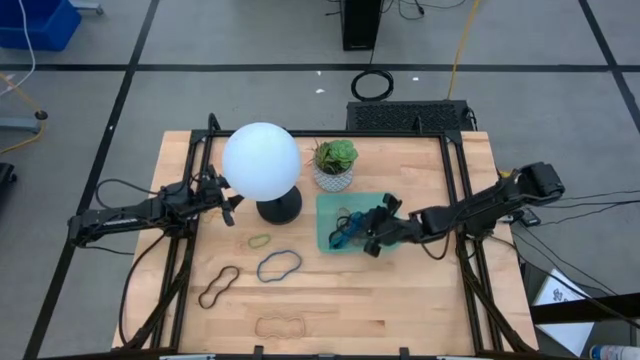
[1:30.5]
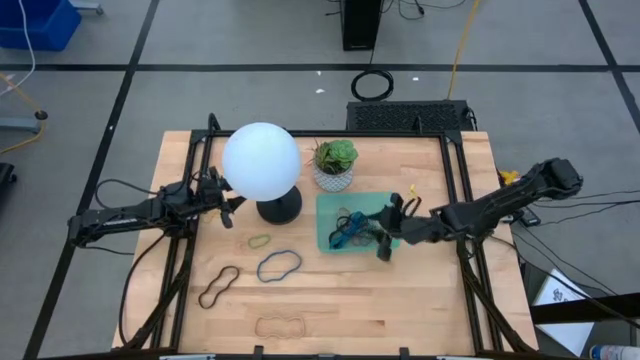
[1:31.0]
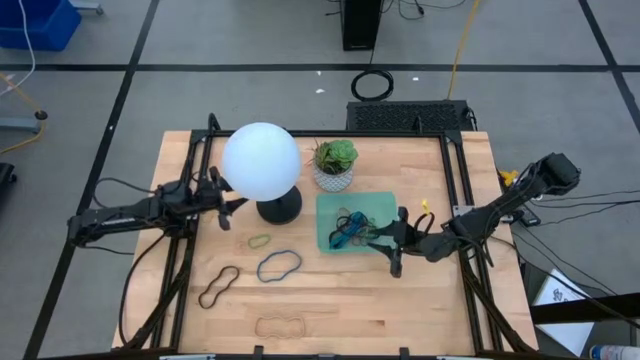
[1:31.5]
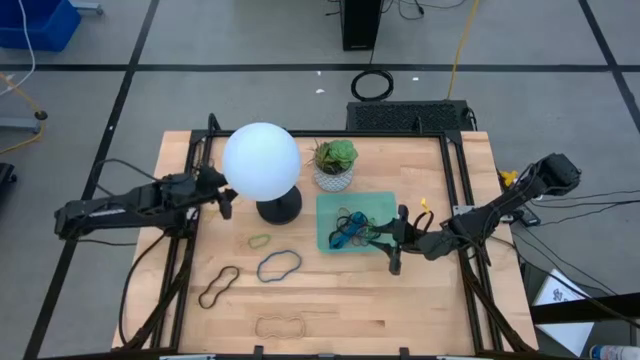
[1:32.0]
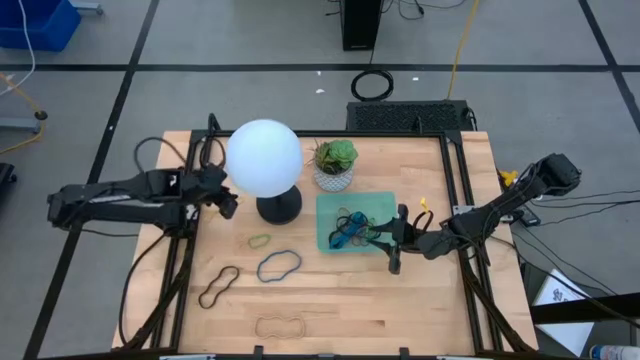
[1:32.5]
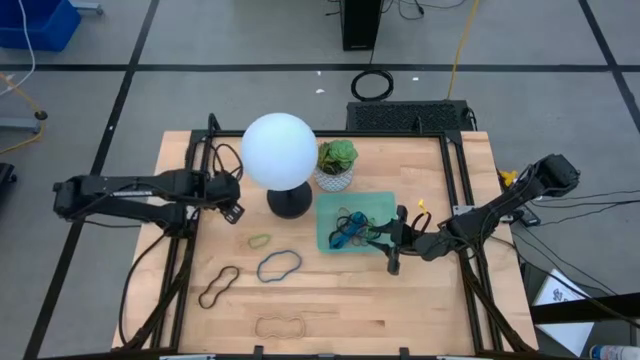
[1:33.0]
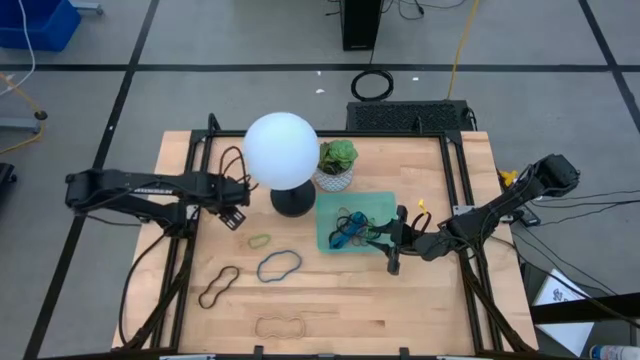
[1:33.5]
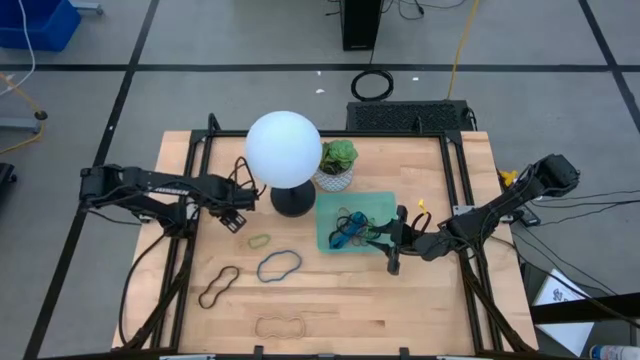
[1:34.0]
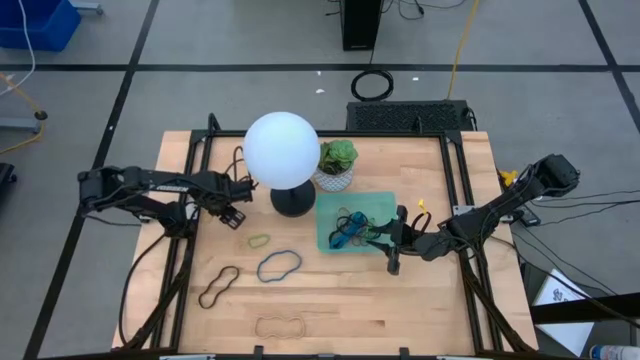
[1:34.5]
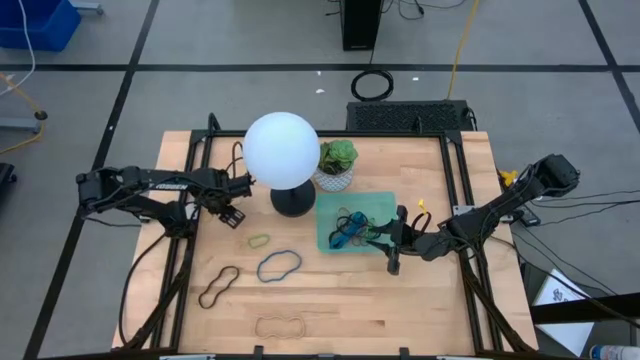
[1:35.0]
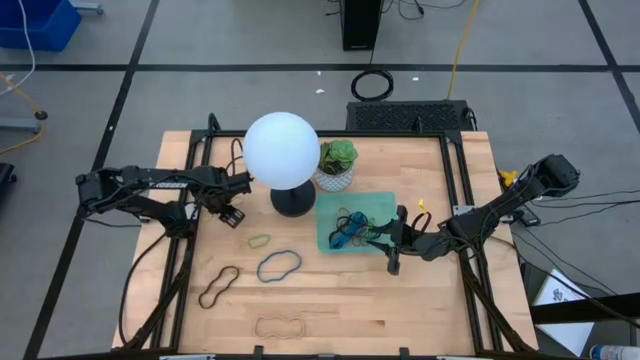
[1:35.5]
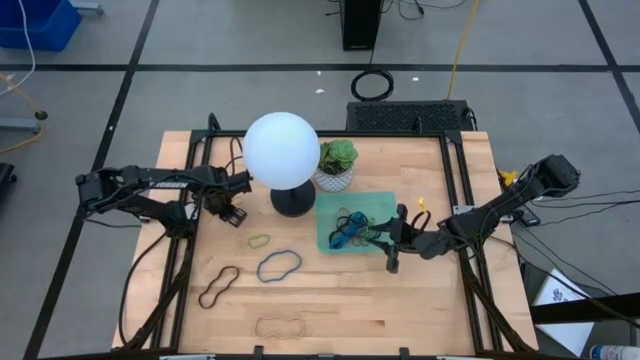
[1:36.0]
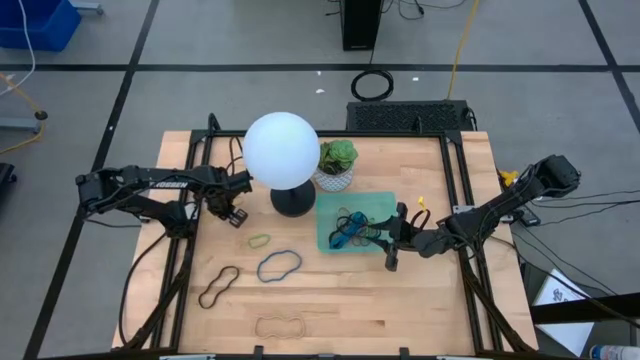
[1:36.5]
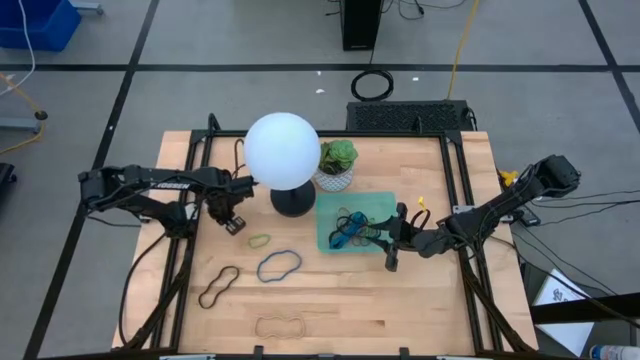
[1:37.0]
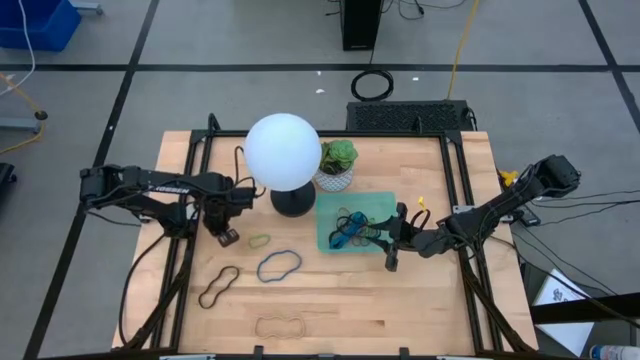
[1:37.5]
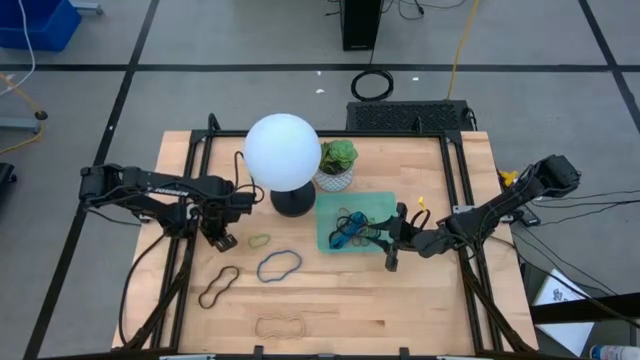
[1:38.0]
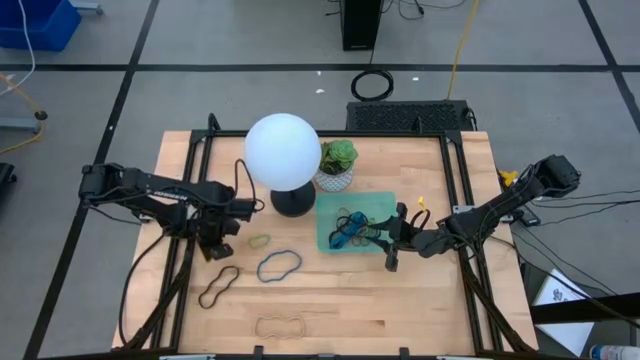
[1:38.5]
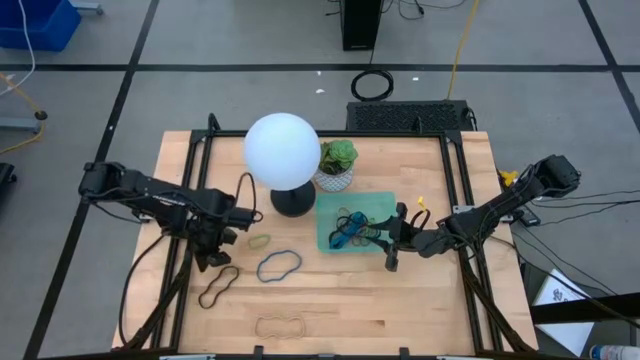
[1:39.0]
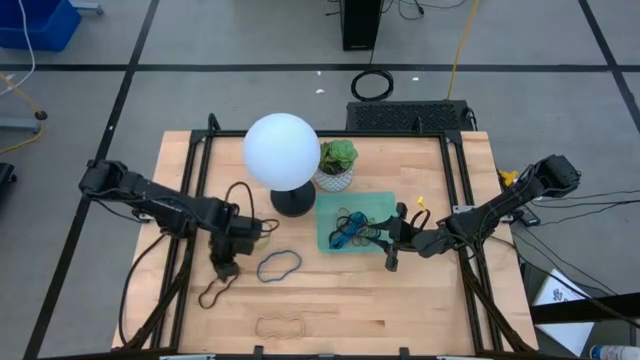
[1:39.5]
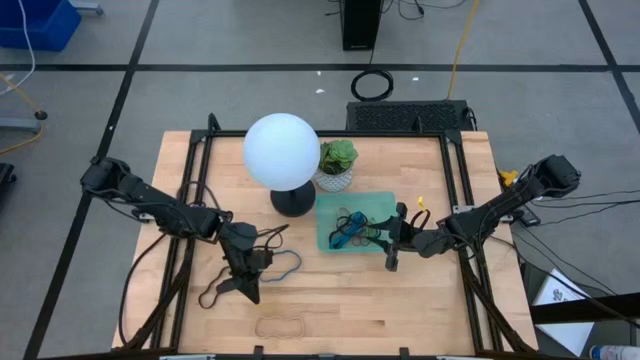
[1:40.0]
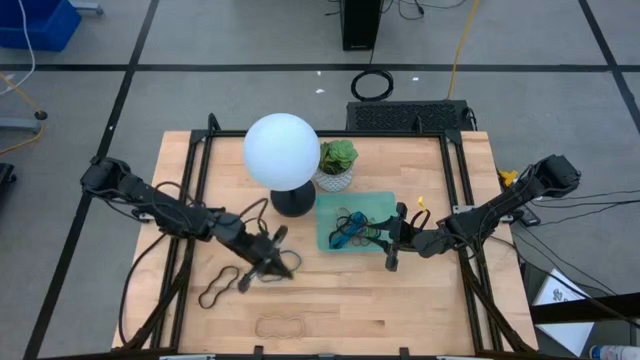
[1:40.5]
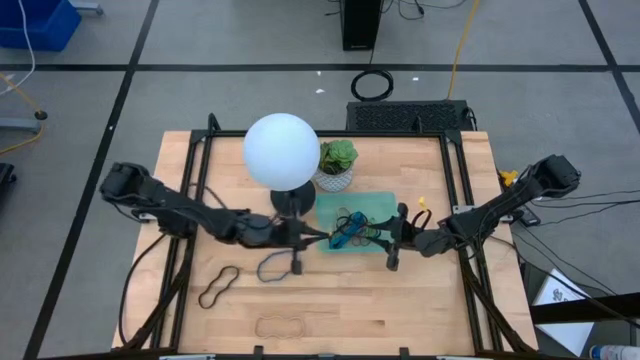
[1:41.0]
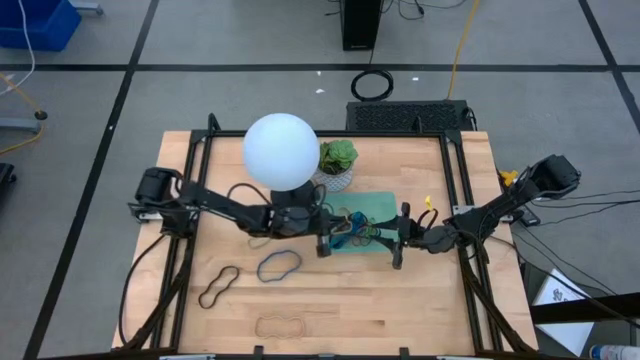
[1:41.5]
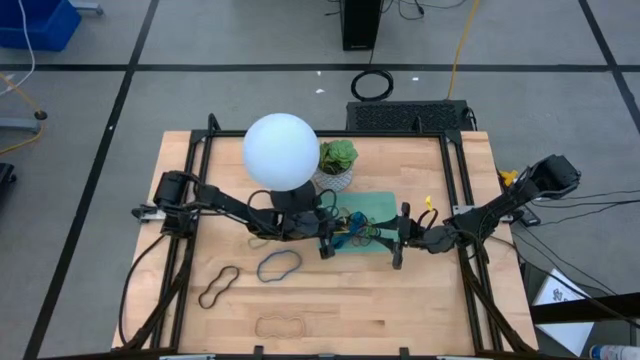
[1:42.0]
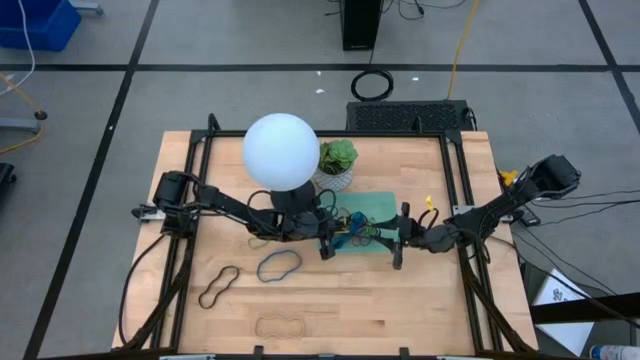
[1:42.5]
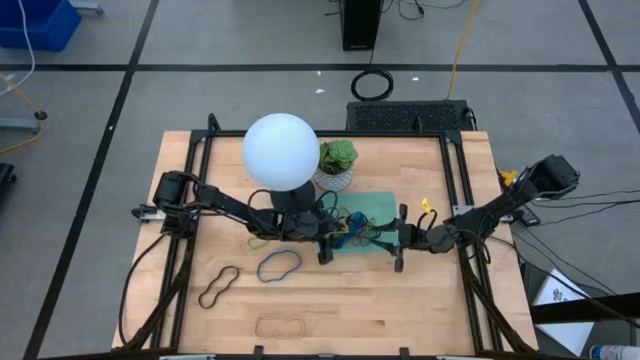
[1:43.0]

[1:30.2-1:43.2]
Task: Pick and place rubber bands into bin
Put the yellow rubber band into the blue bin

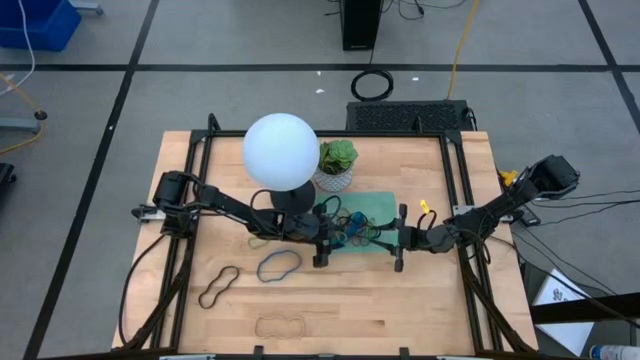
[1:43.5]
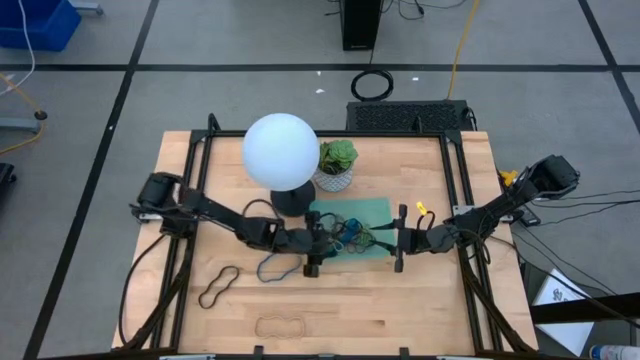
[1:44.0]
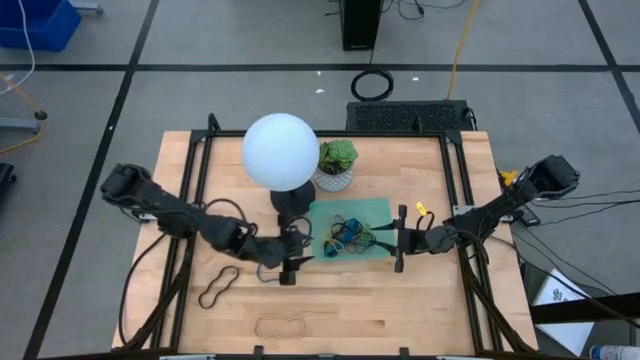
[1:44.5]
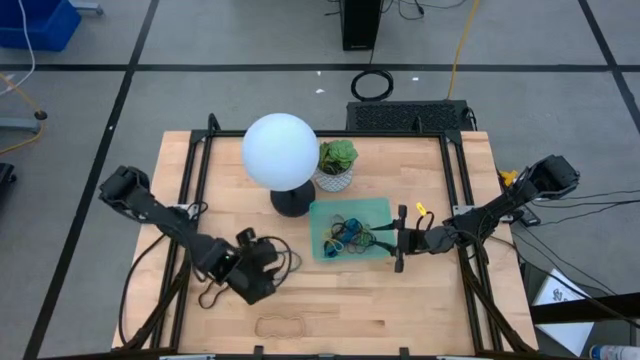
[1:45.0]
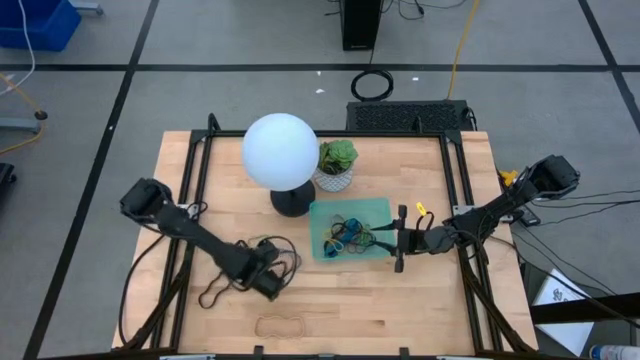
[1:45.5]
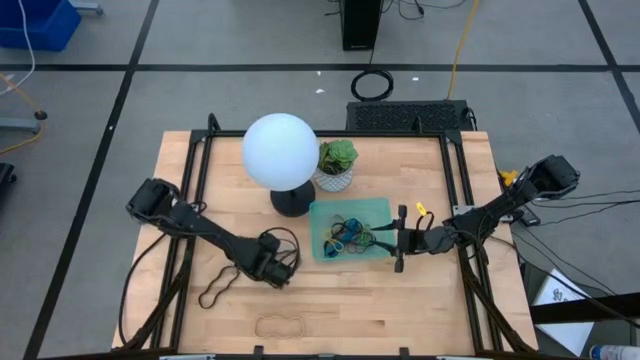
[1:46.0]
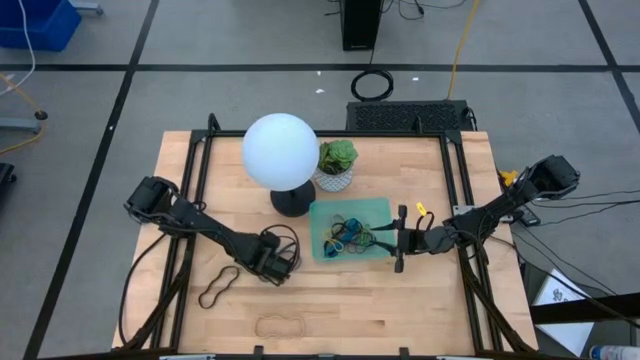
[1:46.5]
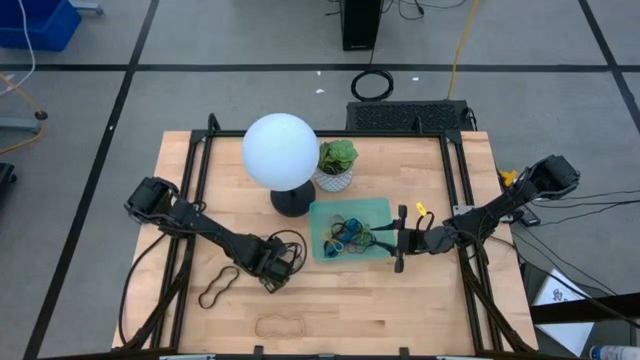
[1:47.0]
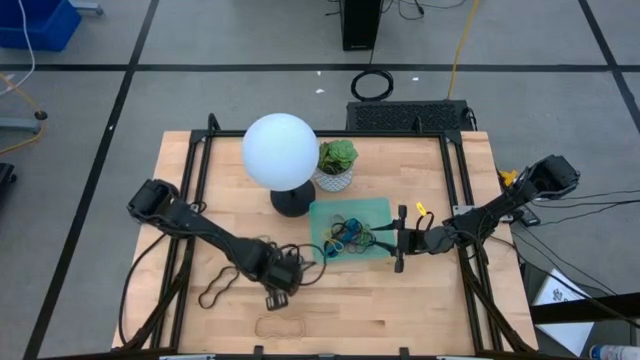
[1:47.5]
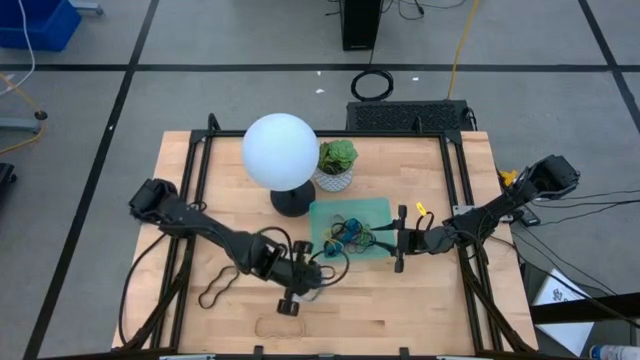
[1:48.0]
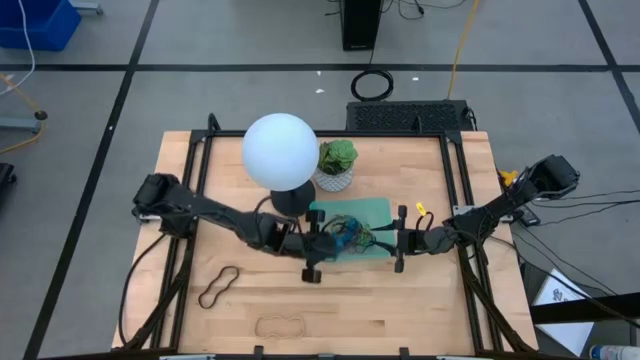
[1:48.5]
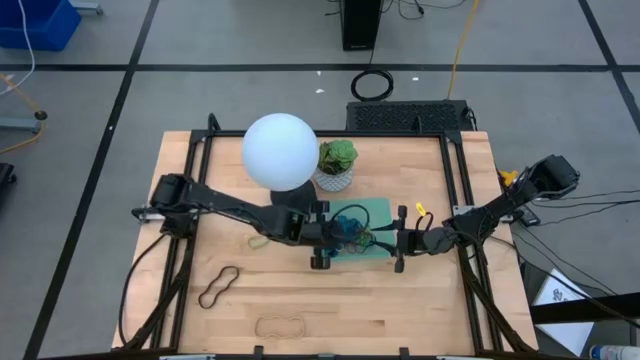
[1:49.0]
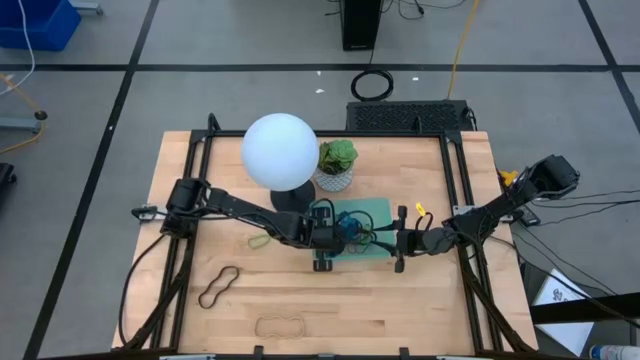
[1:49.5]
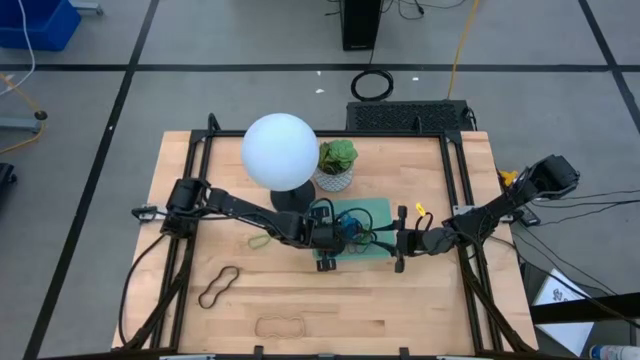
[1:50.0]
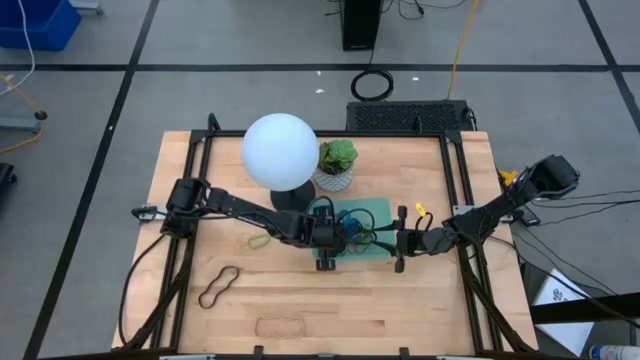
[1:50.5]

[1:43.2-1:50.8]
Put the blue rubber band into the blue bin

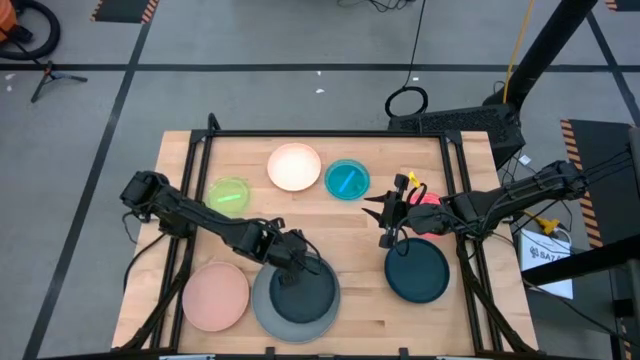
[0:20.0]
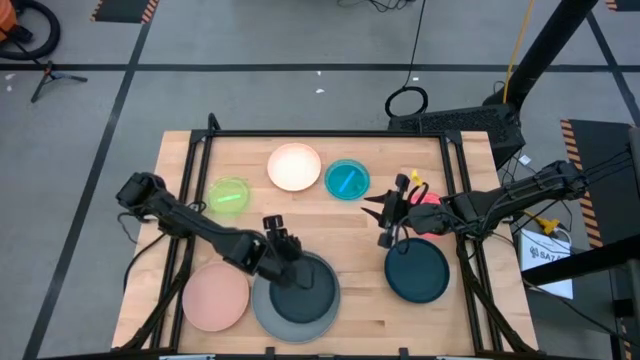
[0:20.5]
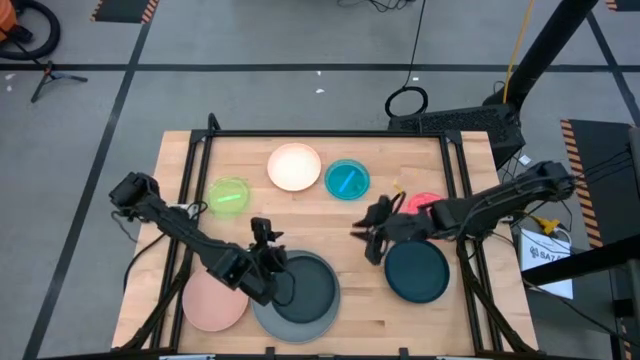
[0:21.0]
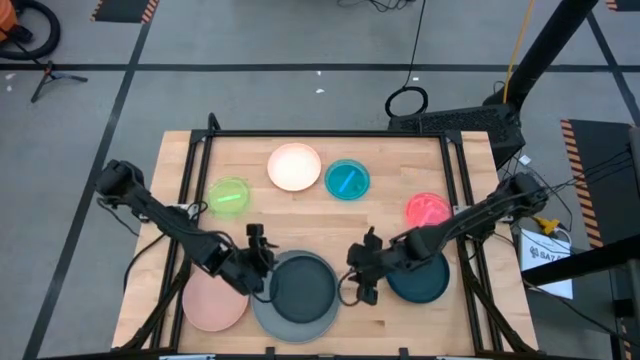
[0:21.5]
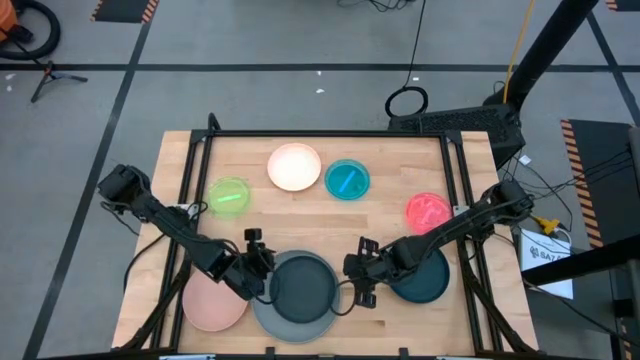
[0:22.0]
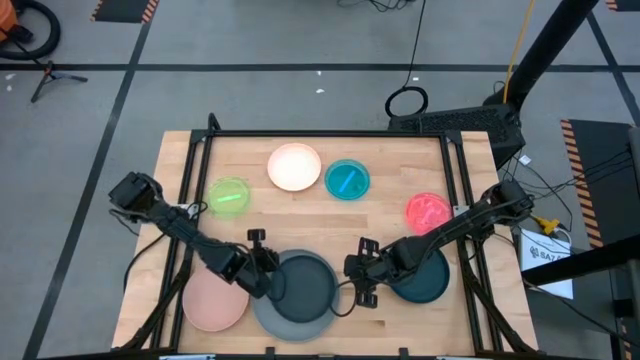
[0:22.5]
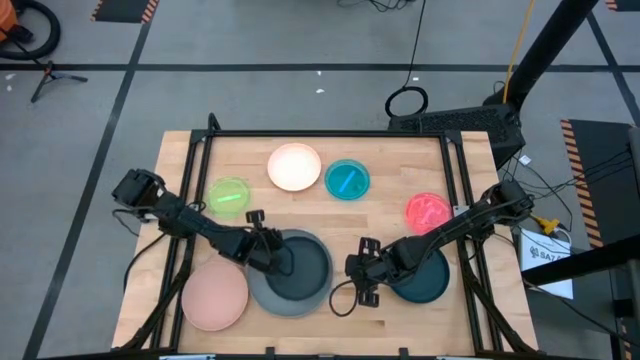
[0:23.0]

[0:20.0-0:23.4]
Task: Stack plastic plates
Adjust the stacked plates
